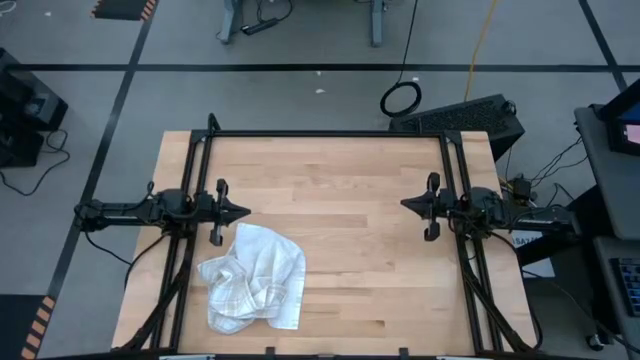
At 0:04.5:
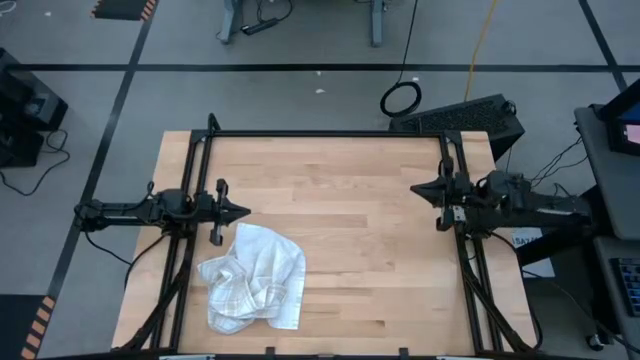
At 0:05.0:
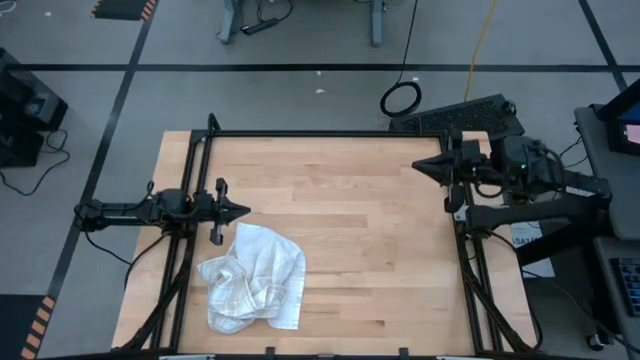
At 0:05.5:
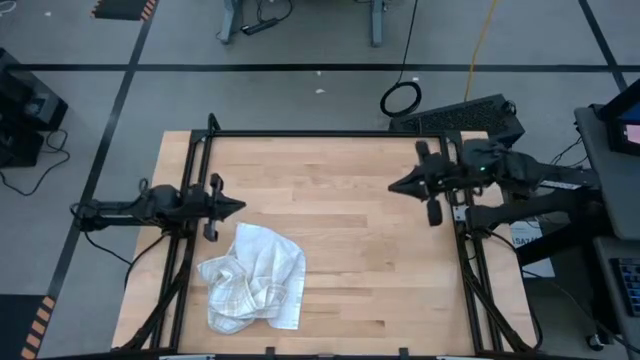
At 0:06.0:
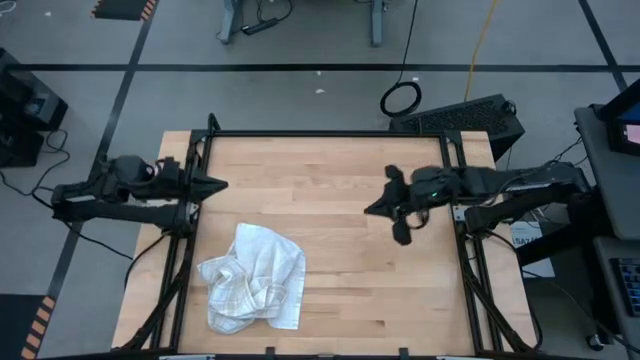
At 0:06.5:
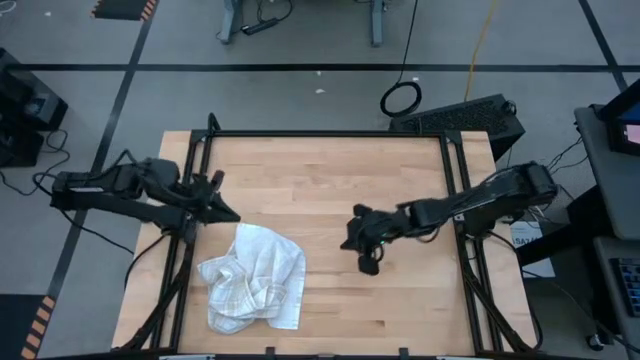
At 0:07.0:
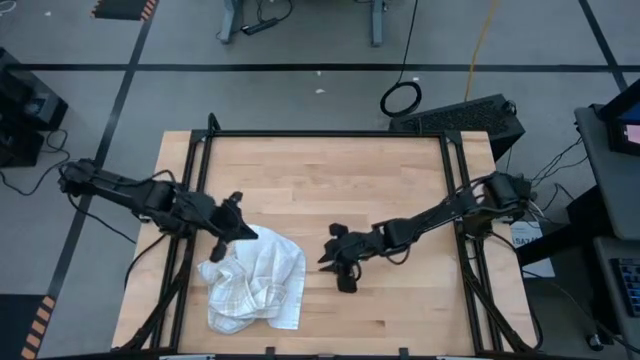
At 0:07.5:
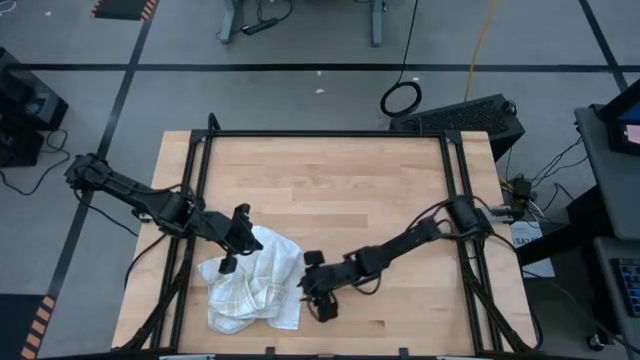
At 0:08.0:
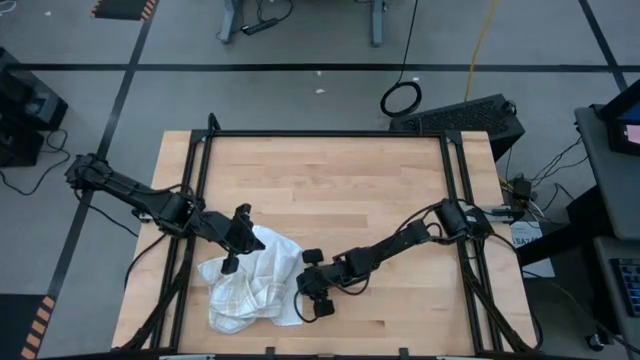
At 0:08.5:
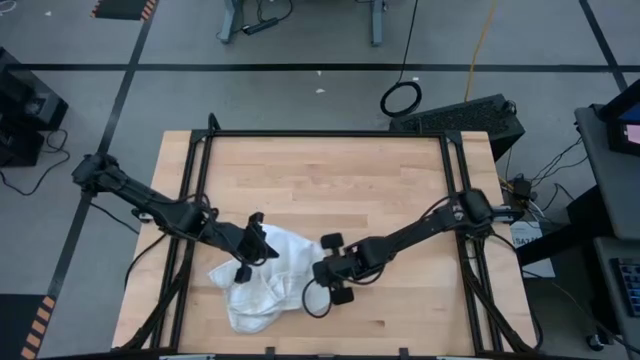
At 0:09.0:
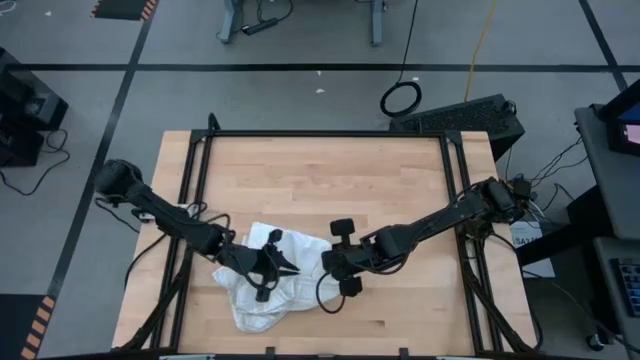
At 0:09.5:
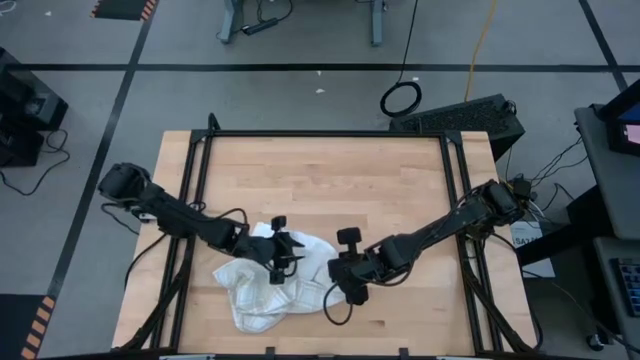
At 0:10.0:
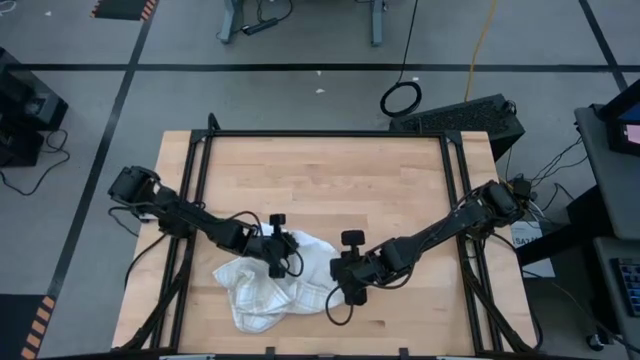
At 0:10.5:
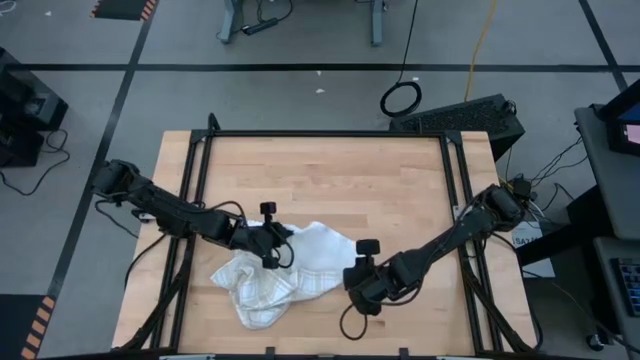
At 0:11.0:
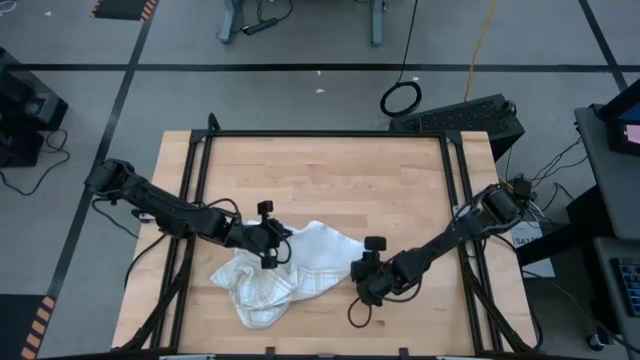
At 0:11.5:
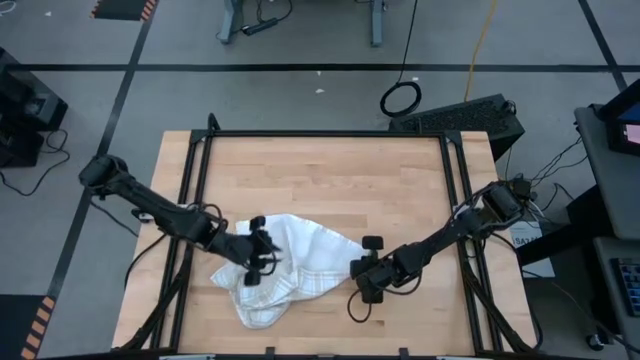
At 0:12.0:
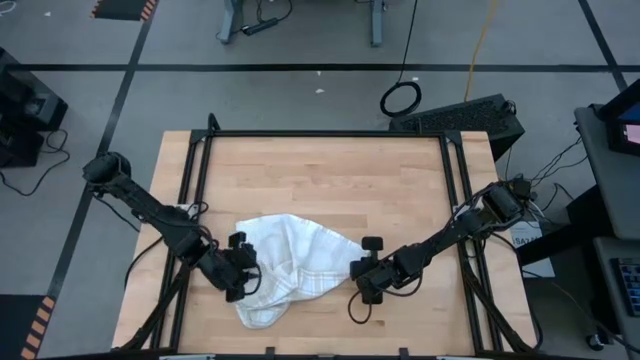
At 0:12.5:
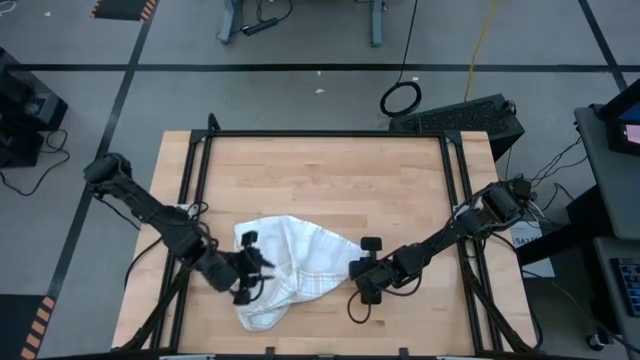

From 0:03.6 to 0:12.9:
Task: Roll towel
Fold the brown checkered towel

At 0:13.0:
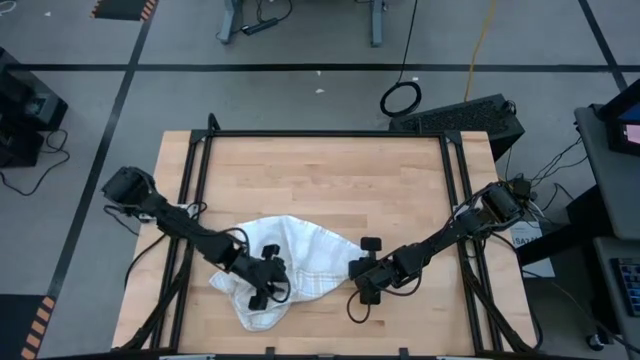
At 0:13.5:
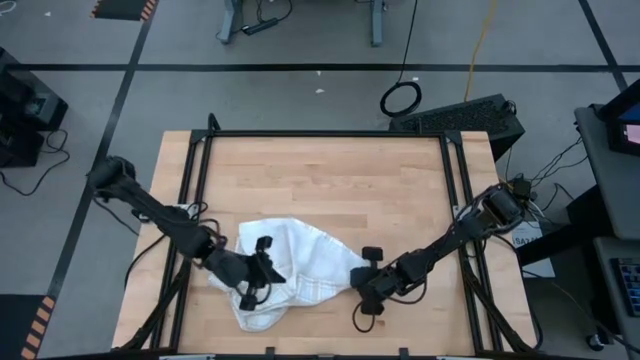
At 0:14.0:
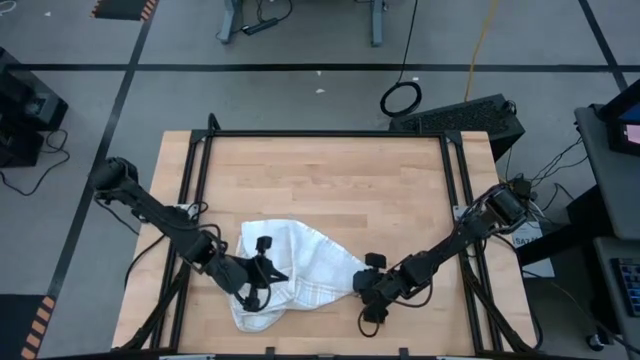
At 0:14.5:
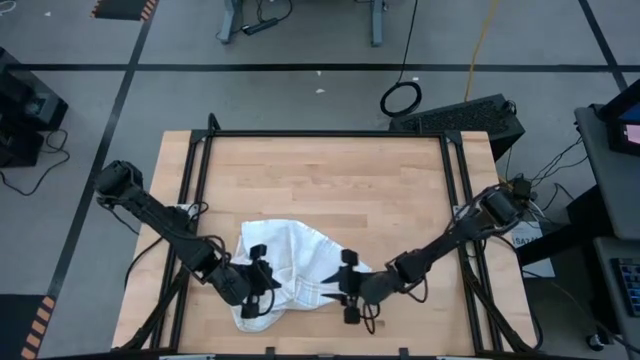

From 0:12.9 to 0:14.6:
Fold the brown checkered towel

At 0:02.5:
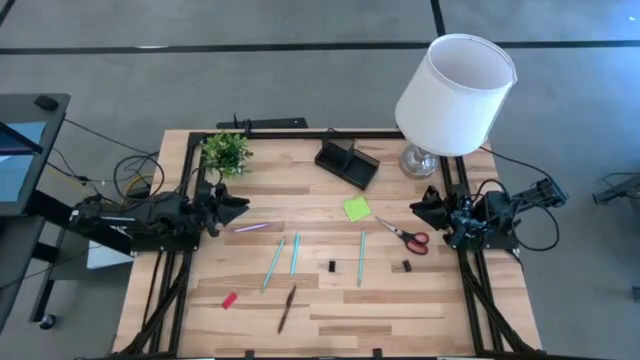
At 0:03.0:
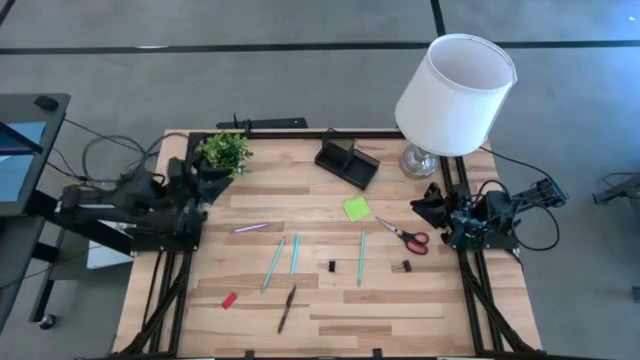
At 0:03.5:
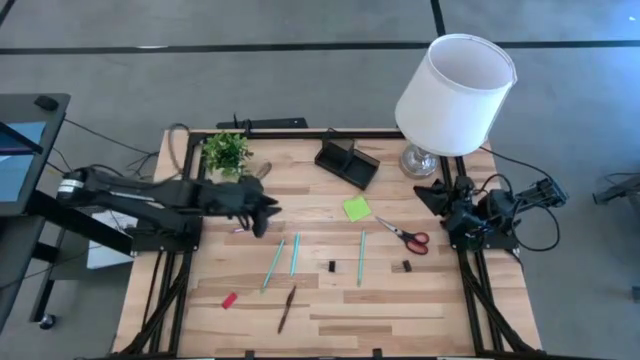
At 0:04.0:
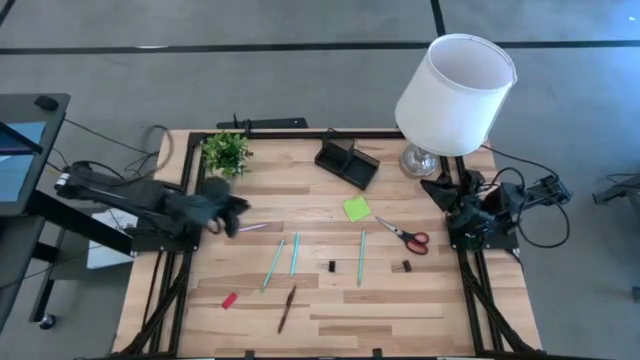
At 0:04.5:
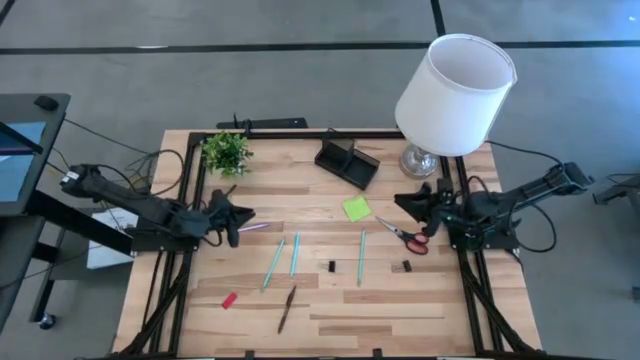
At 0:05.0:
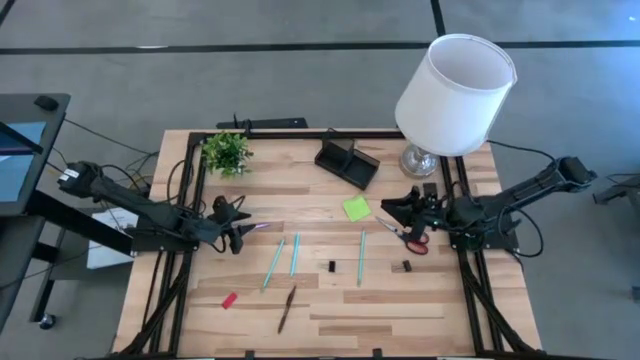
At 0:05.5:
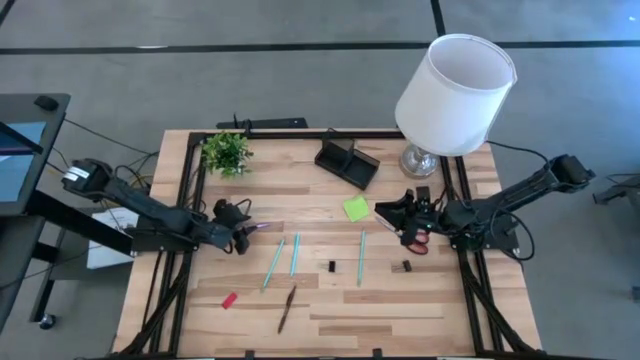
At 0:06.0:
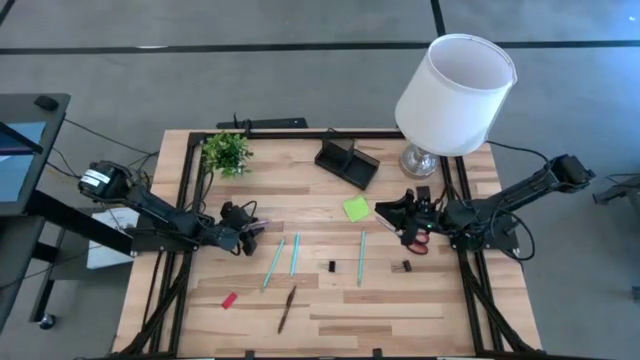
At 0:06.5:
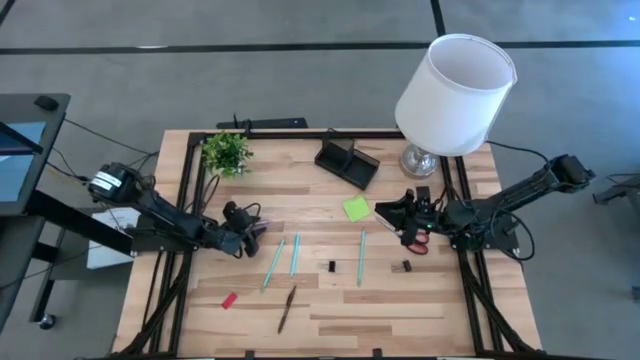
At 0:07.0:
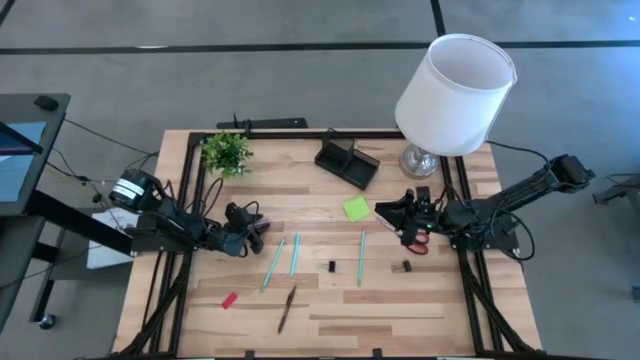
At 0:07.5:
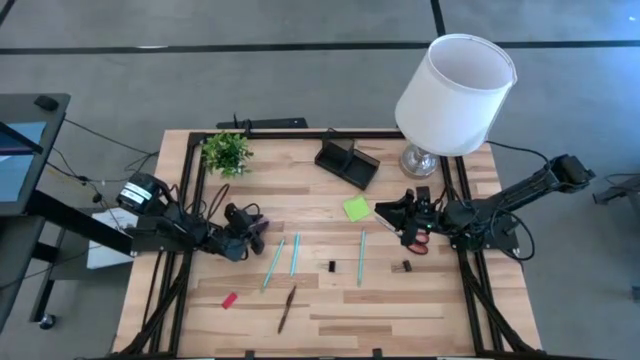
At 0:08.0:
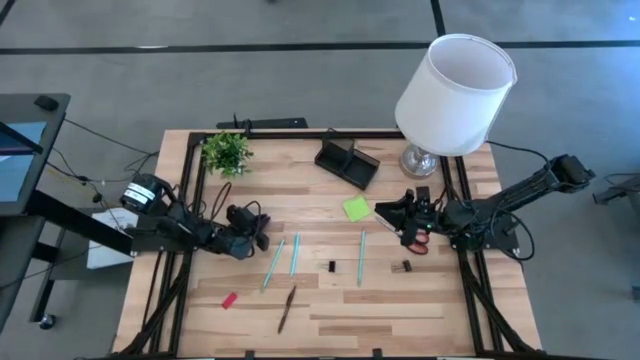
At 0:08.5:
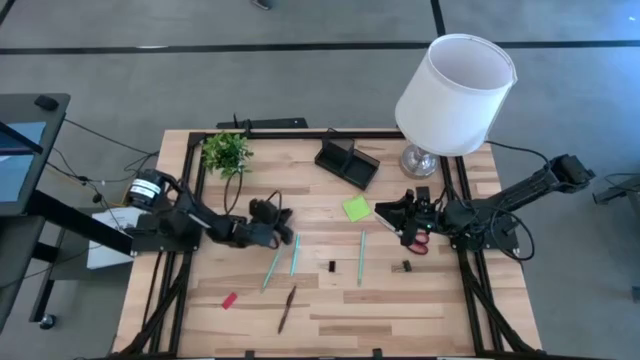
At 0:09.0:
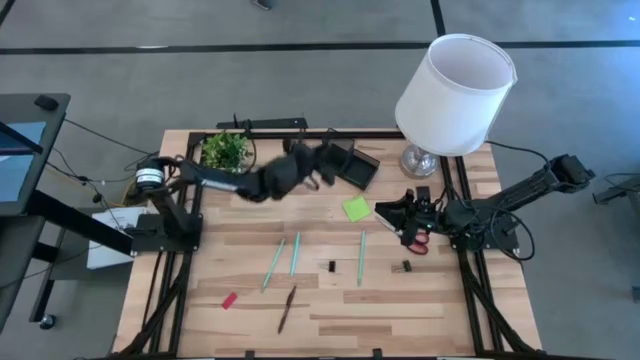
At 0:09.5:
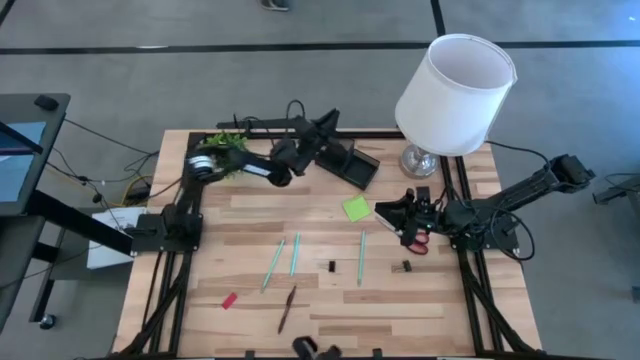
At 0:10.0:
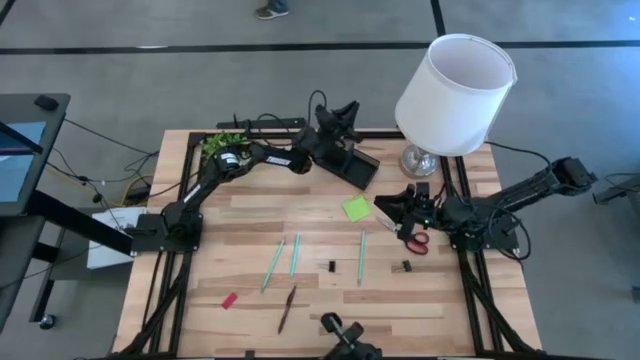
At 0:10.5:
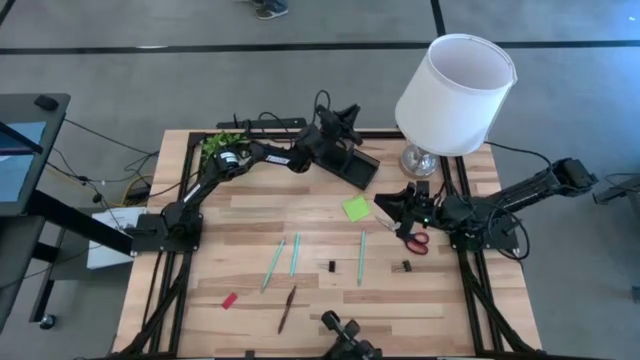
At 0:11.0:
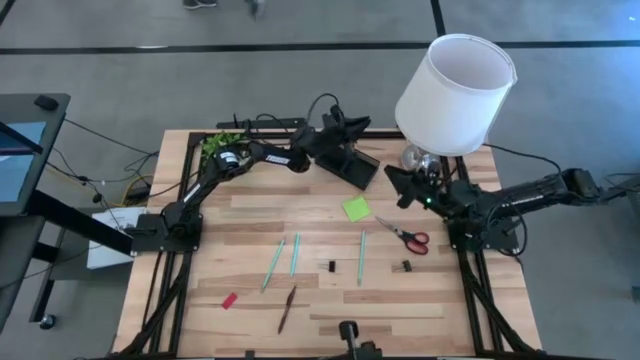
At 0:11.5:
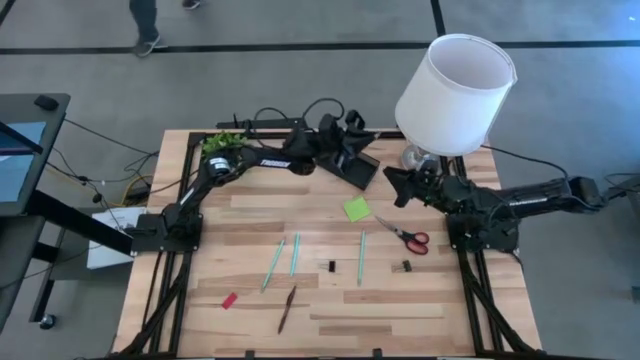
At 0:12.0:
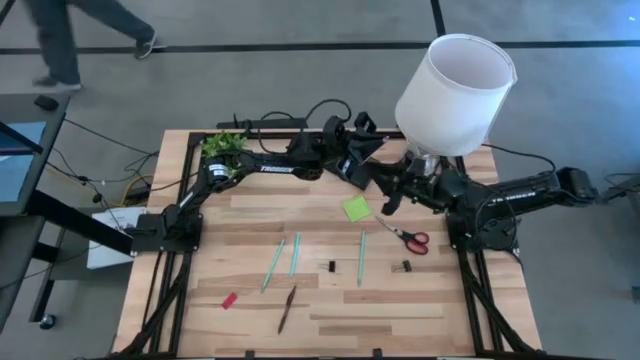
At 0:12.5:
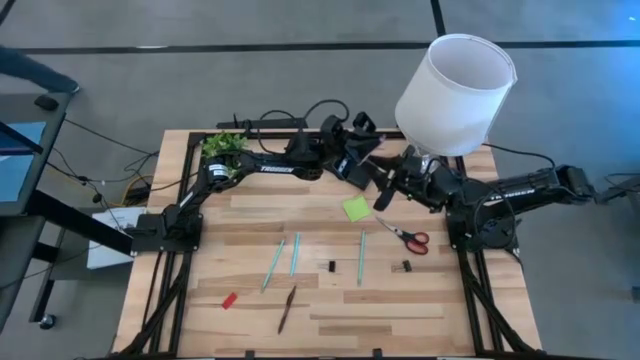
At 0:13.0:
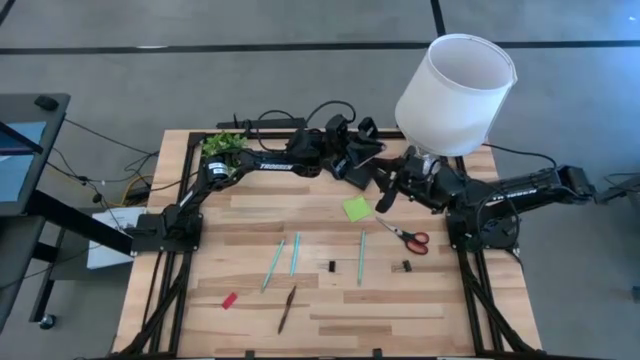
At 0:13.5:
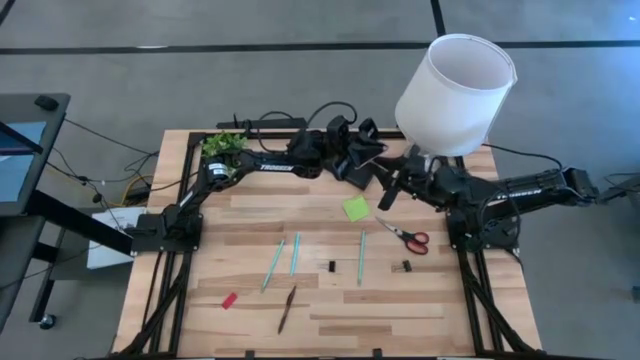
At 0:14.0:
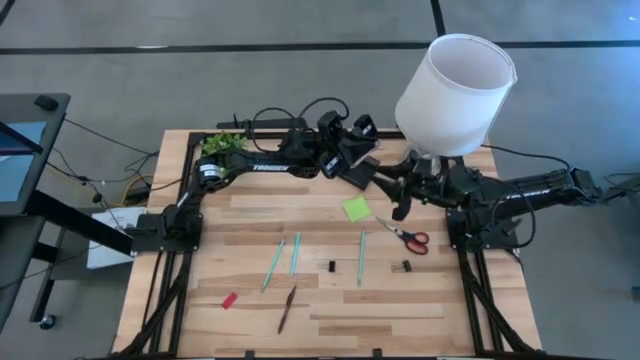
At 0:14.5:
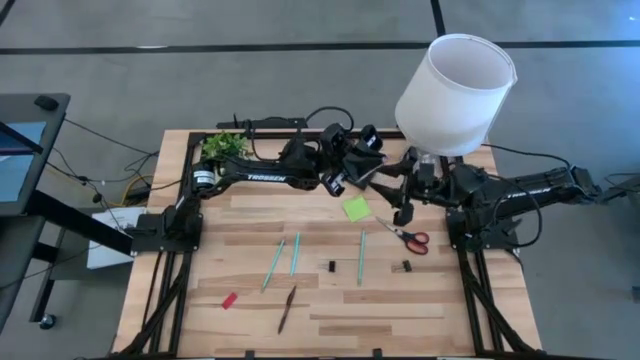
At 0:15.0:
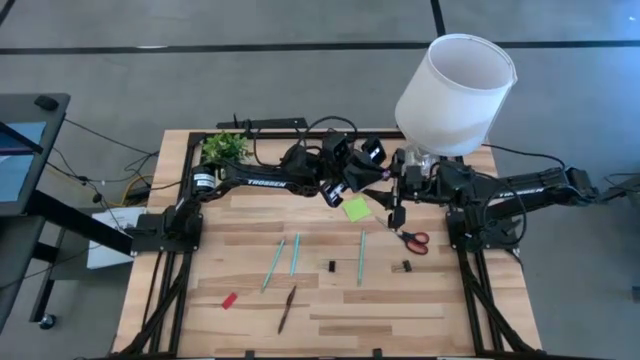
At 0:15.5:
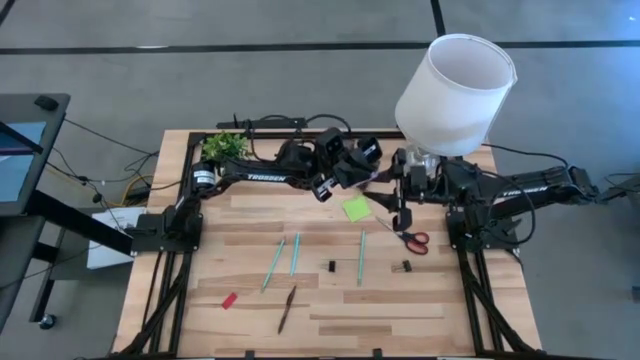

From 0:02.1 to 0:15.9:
Task: Pick and place office supplies into organizer
Put the purple pen into the black desk organizer
